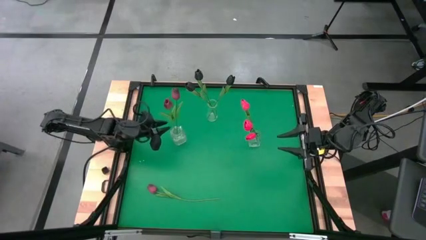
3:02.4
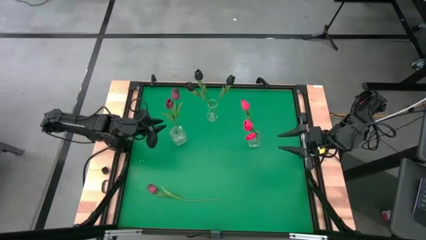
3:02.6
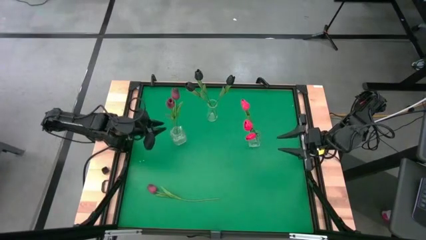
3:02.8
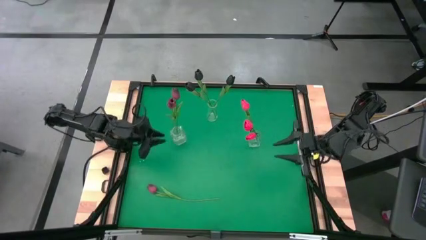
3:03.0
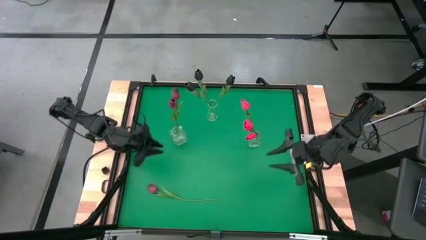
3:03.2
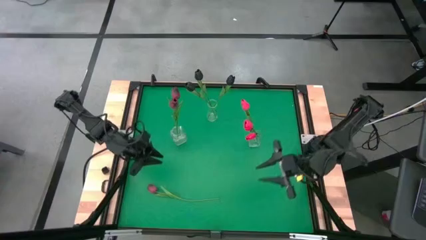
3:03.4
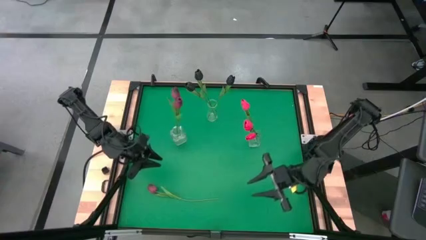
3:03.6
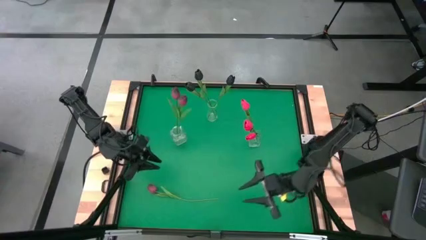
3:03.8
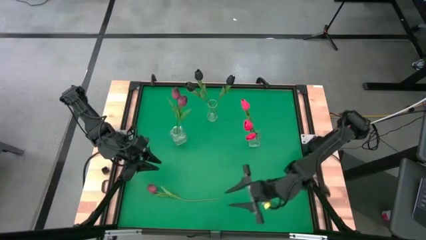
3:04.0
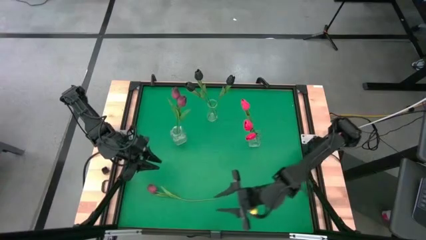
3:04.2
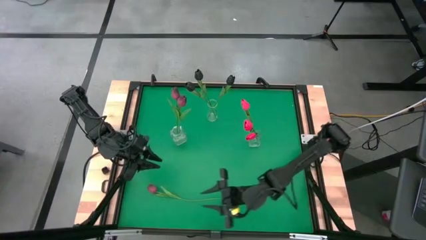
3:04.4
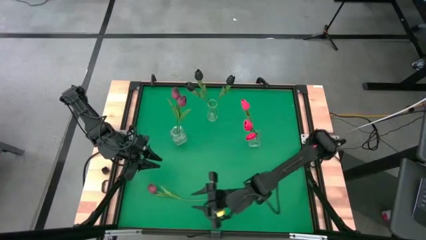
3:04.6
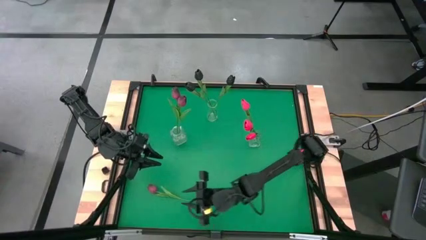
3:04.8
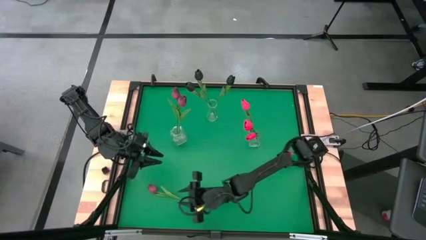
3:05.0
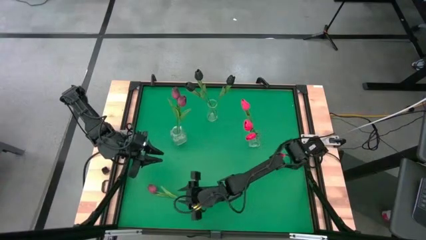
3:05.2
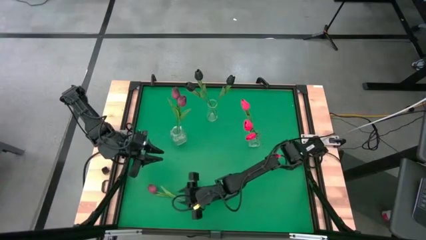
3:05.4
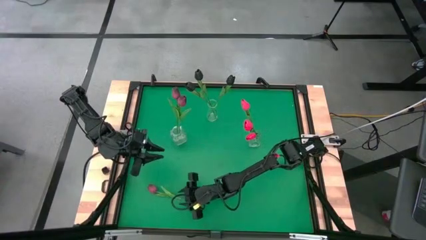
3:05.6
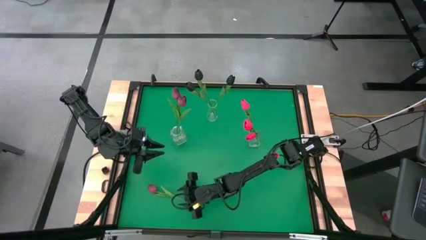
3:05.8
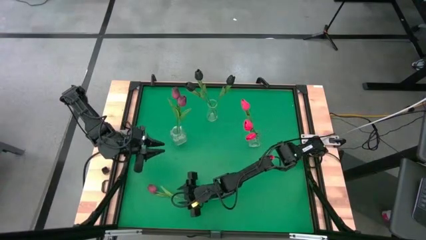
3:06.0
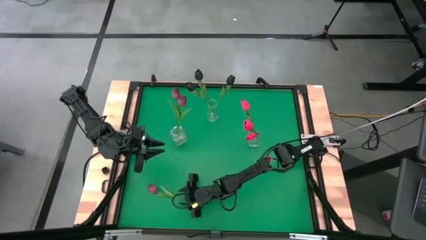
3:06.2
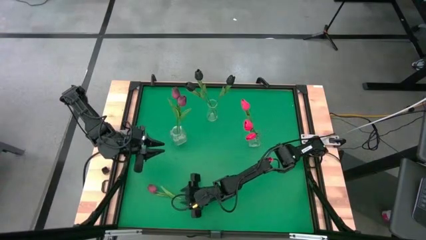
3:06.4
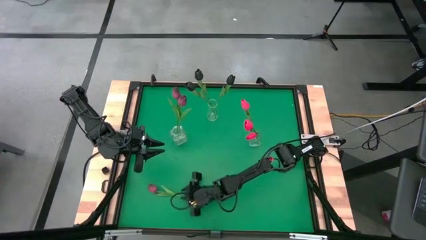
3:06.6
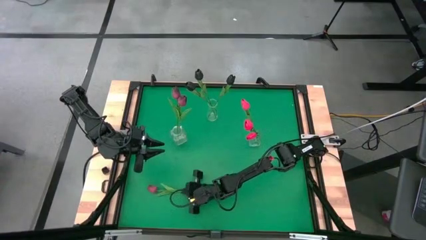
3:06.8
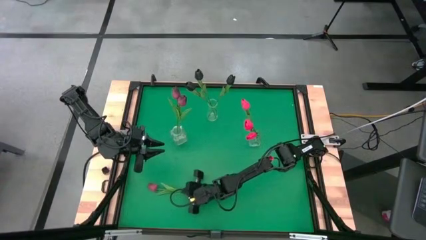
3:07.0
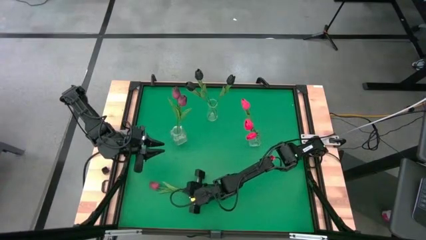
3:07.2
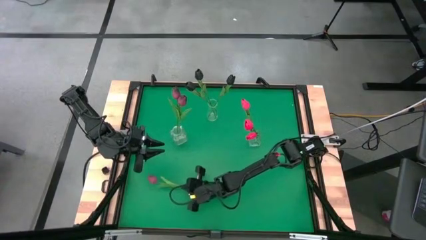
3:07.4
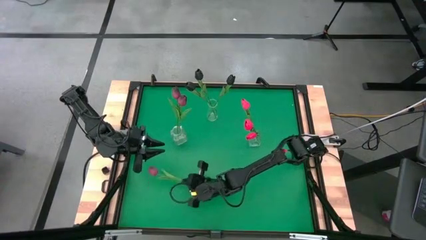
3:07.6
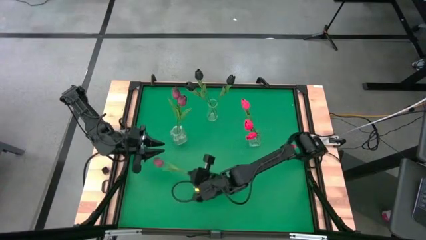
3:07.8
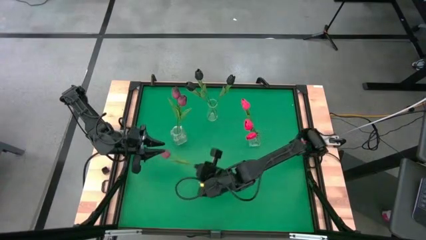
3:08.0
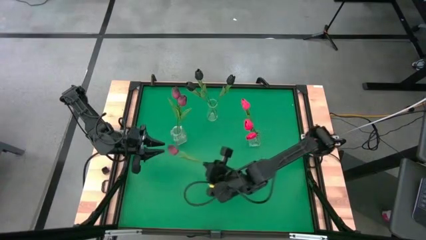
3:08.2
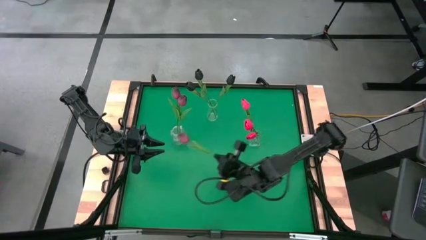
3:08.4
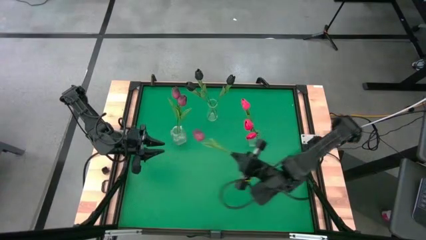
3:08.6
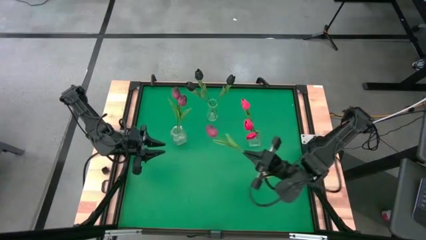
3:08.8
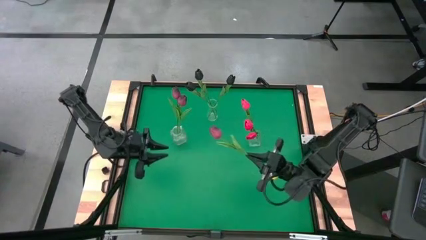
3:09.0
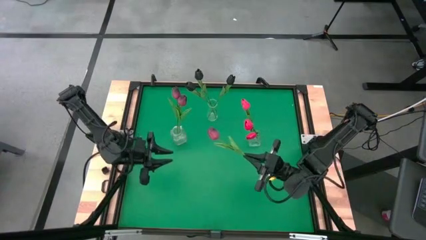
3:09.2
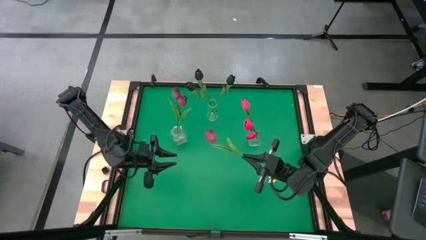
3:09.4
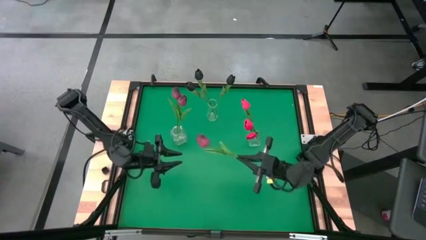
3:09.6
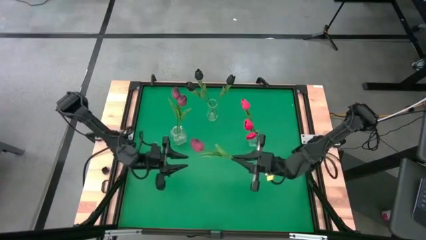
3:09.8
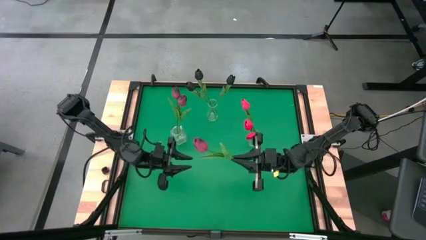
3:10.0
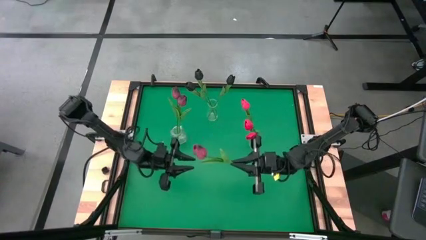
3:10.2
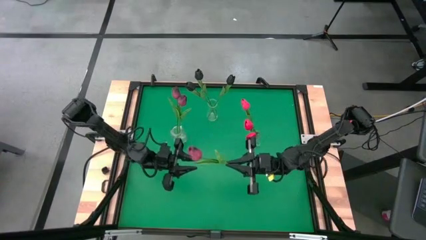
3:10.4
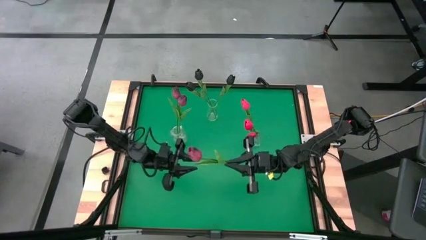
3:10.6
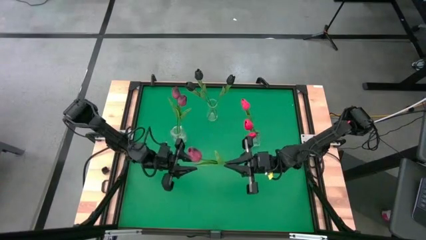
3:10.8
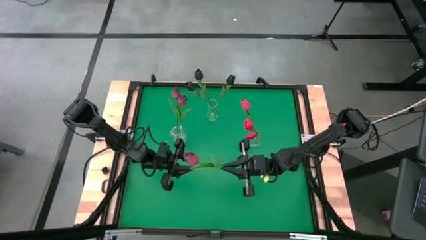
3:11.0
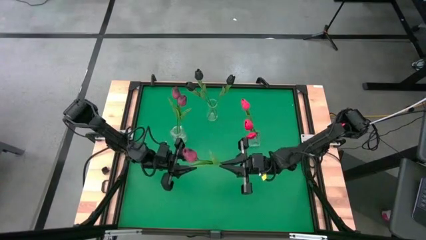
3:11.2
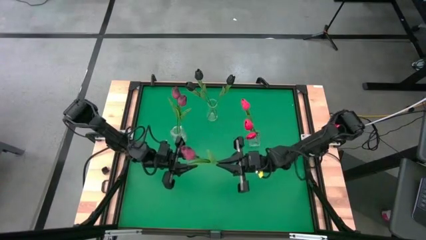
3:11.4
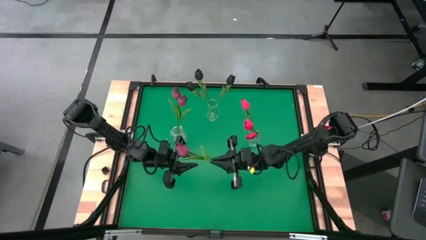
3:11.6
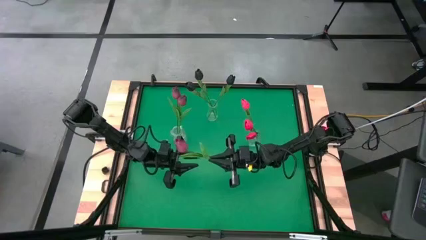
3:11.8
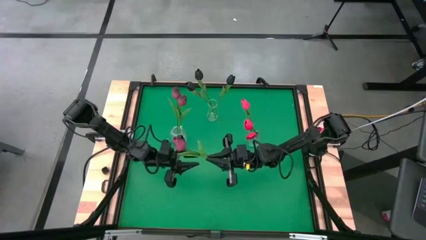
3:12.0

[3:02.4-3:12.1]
Task: Sort flowers into vase by color
Put the red tulip into the bottom left transparent vase

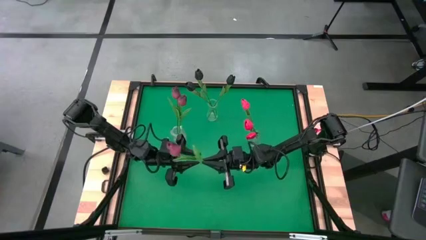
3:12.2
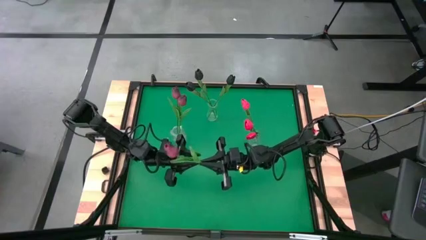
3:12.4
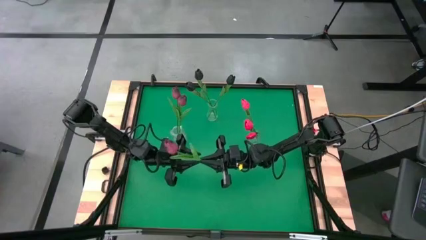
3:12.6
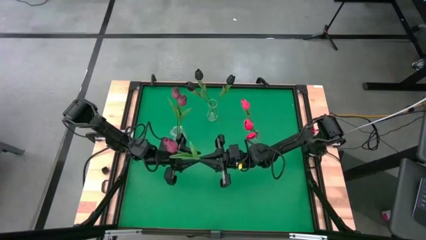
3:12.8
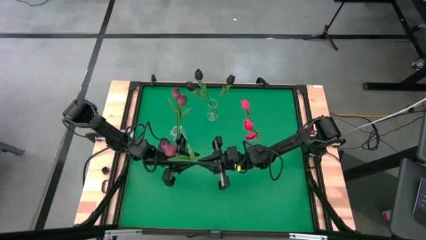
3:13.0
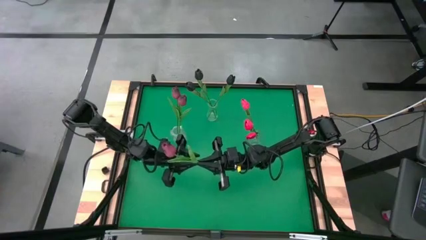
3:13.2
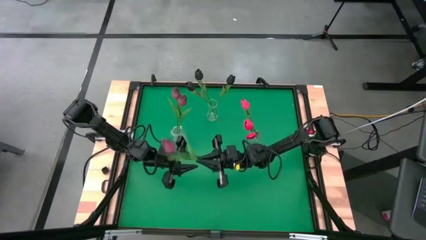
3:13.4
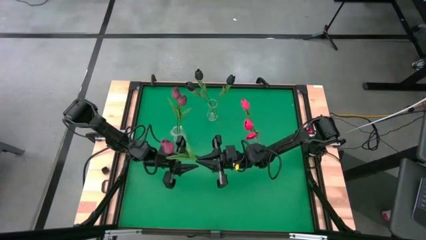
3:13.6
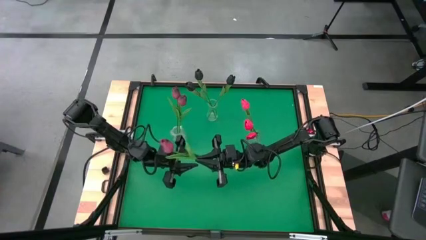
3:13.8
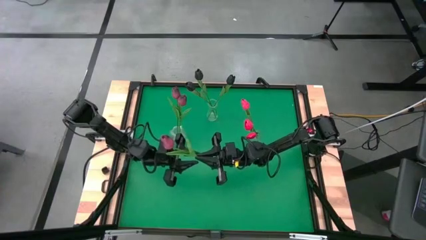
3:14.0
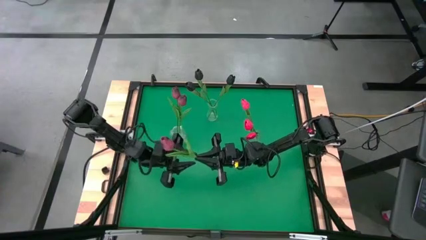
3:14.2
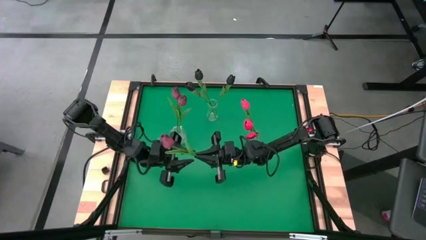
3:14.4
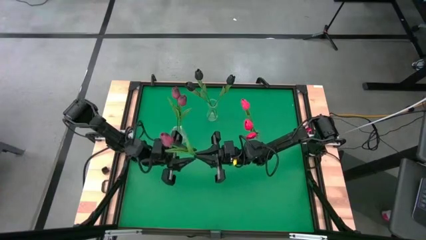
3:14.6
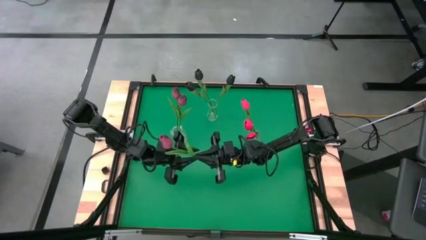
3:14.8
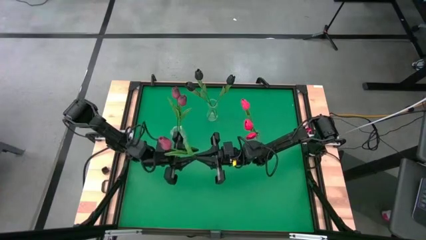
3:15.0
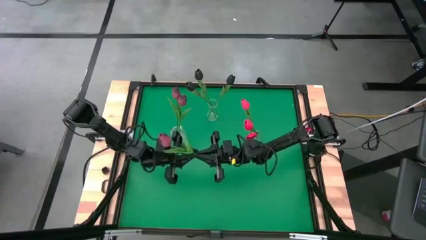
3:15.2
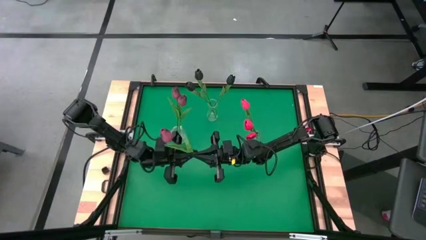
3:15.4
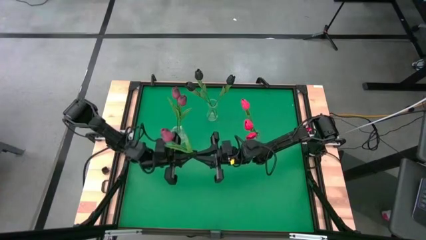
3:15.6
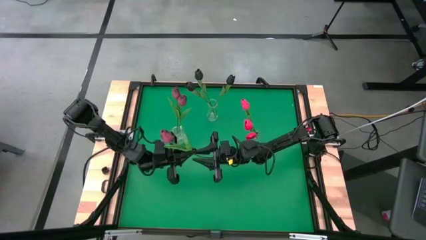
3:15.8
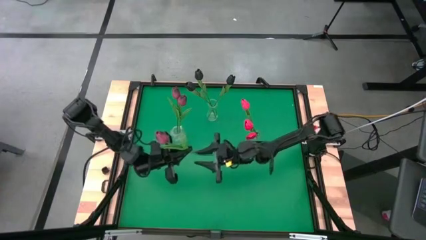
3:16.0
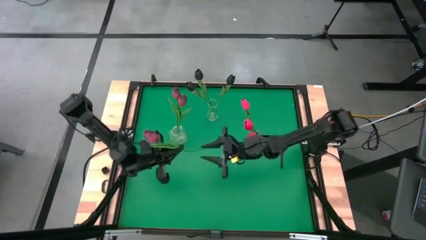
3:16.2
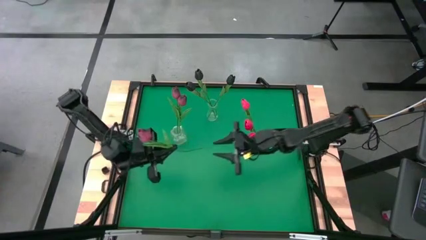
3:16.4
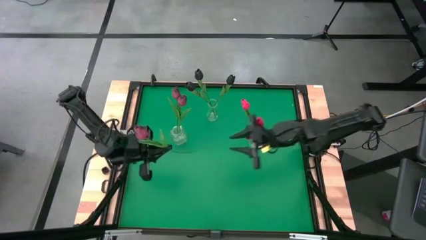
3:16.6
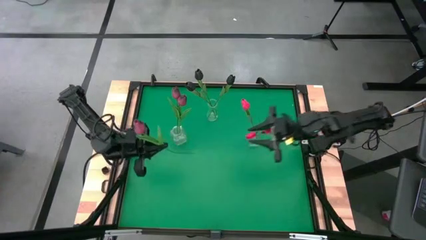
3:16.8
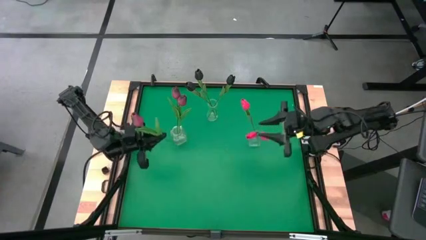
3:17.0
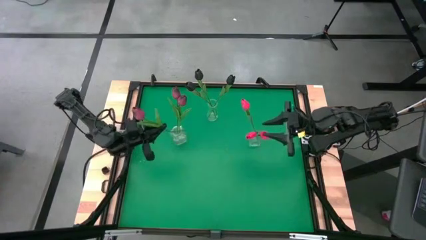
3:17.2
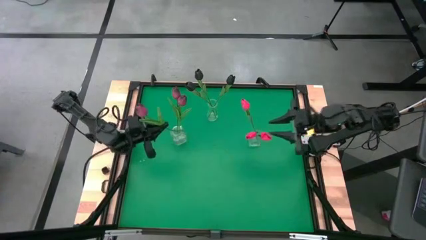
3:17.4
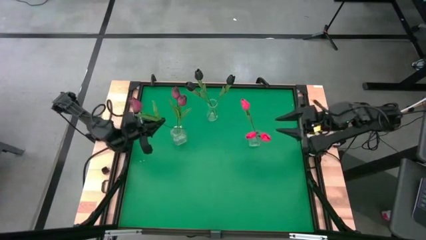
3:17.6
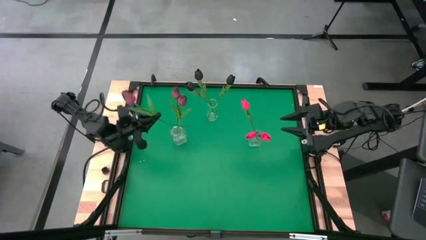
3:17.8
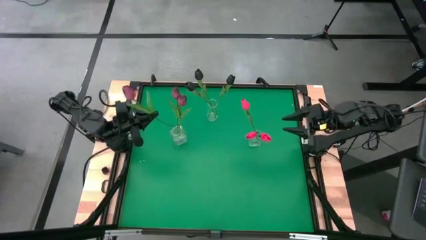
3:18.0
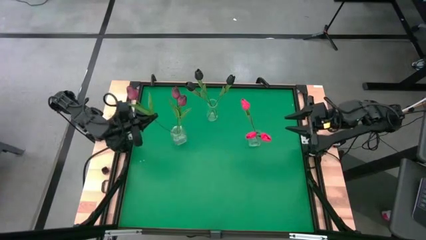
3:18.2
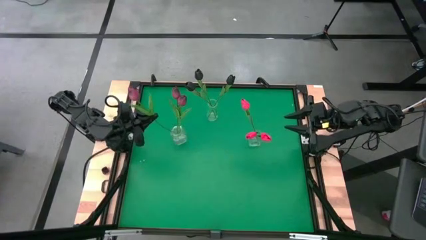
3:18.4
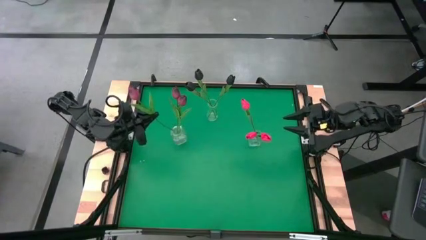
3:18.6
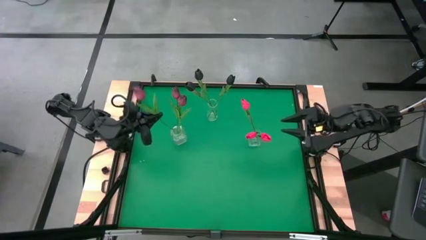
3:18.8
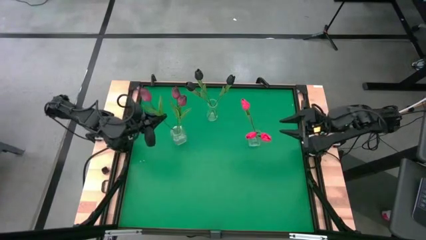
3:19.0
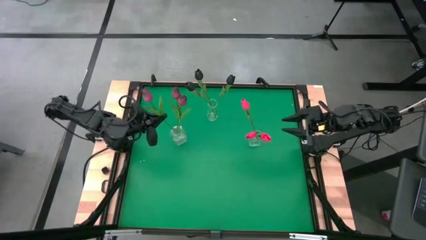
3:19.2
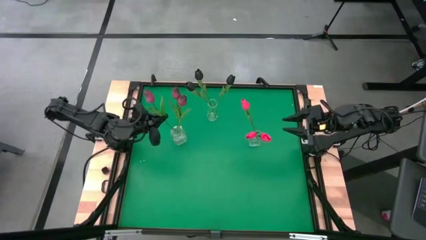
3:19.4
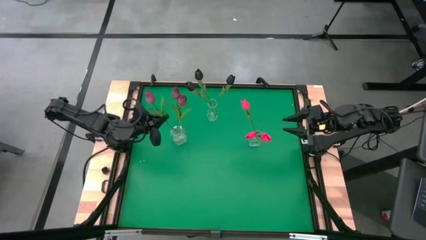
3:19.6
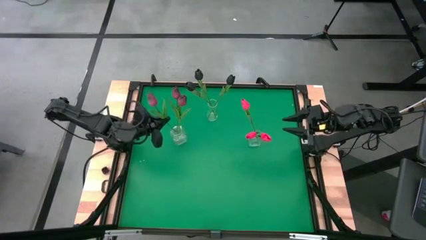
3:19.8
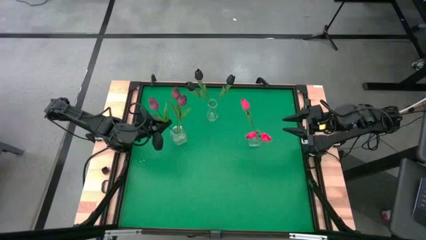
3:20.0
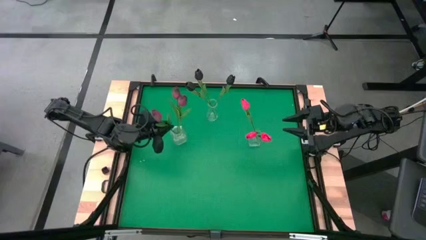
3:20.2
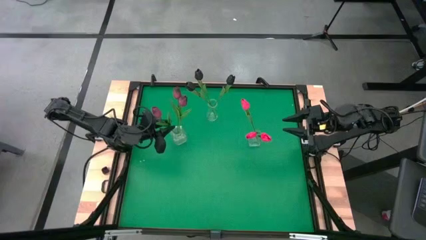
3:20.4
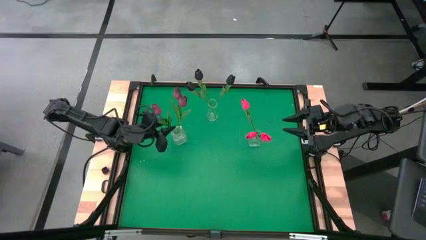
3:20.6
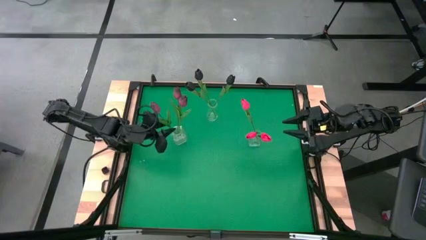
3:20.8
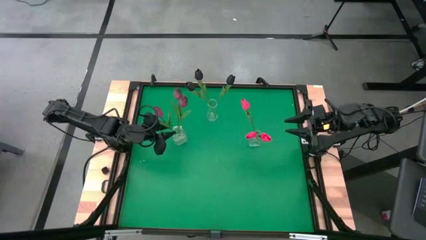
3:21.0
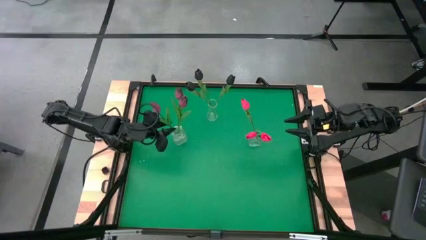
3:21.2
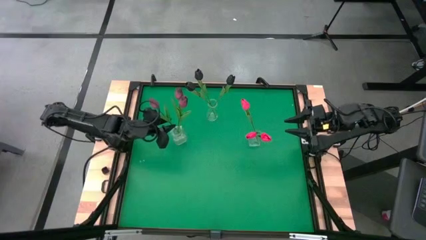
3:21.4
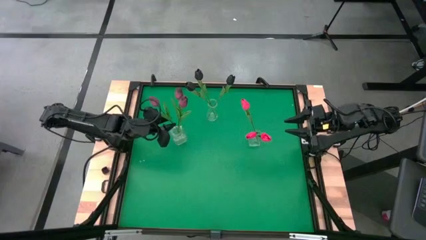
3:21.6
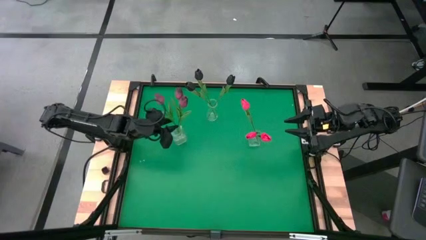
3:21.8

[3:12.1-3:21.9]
Put the red tulip into the bottom left transparent vase
